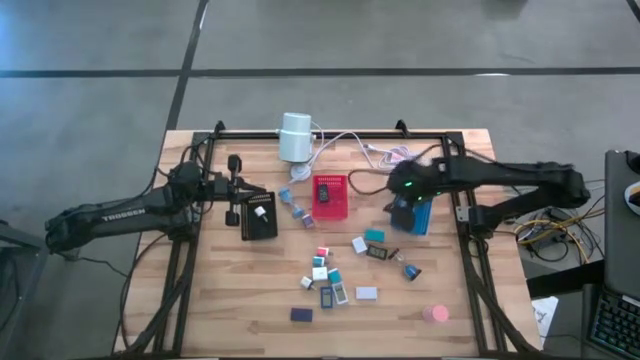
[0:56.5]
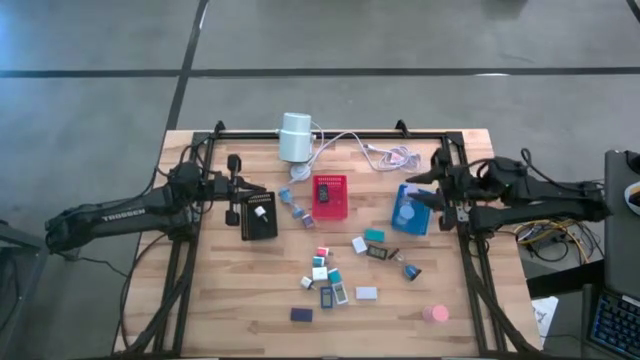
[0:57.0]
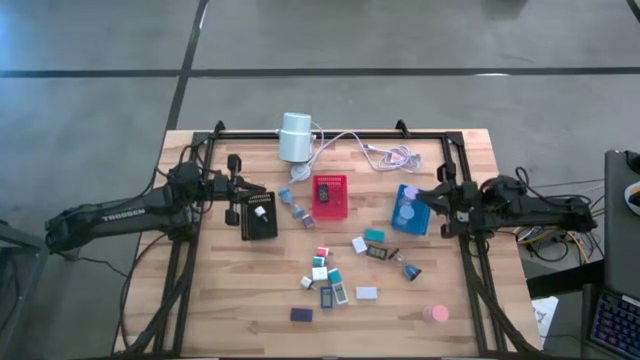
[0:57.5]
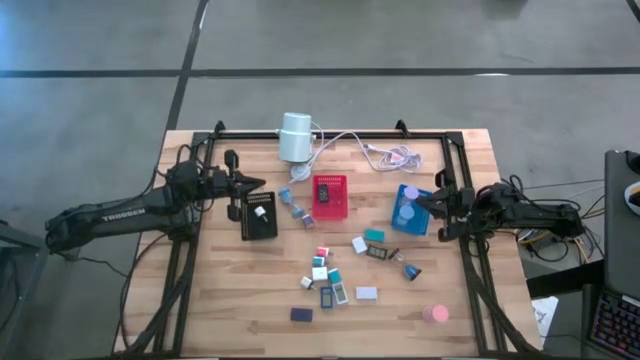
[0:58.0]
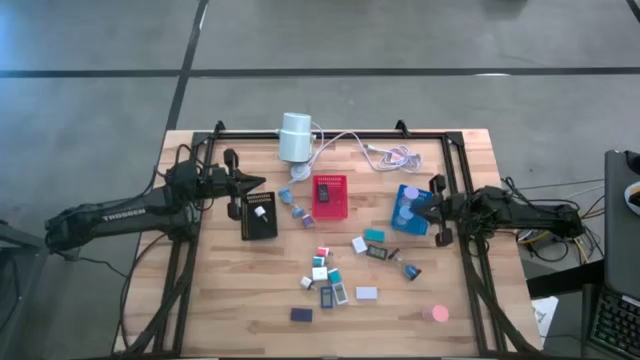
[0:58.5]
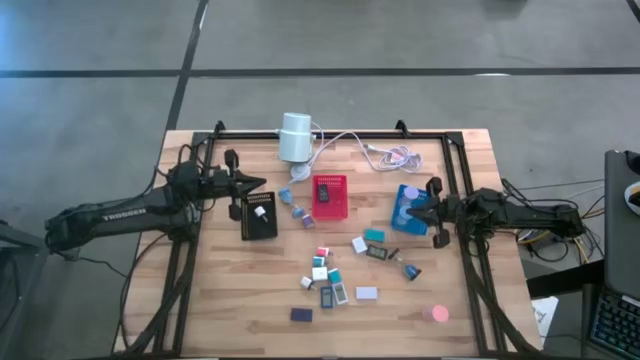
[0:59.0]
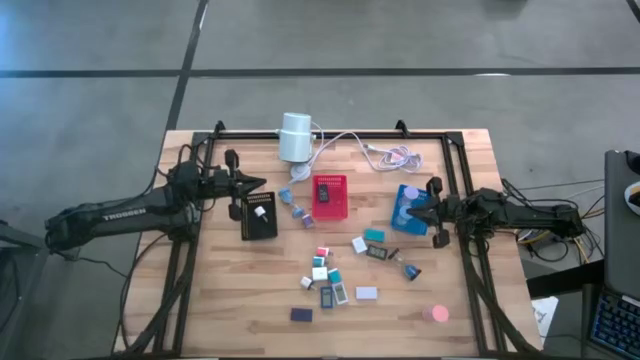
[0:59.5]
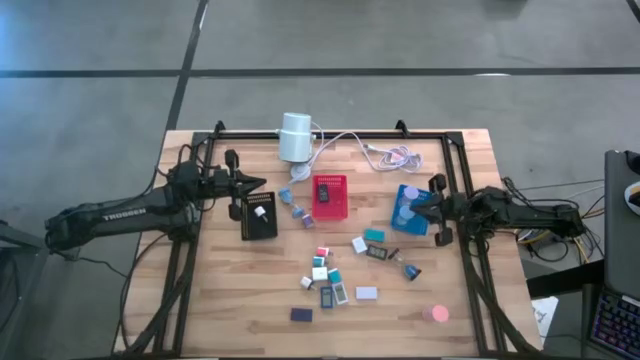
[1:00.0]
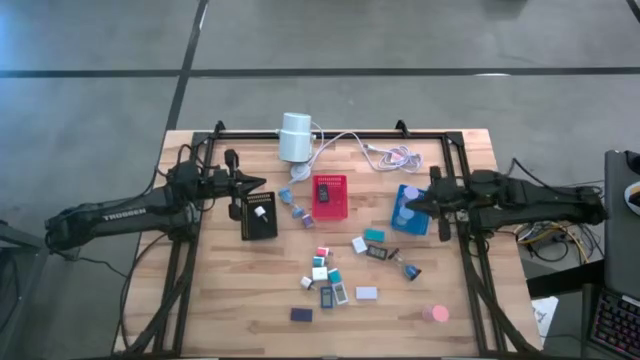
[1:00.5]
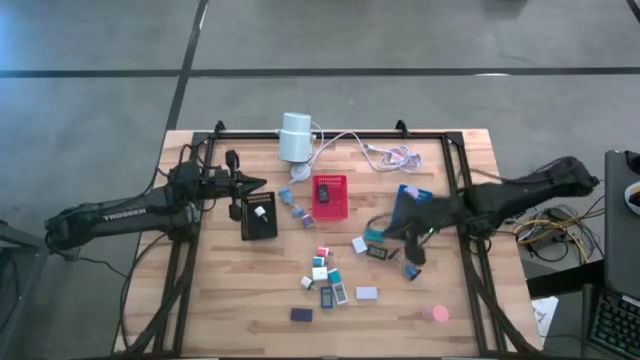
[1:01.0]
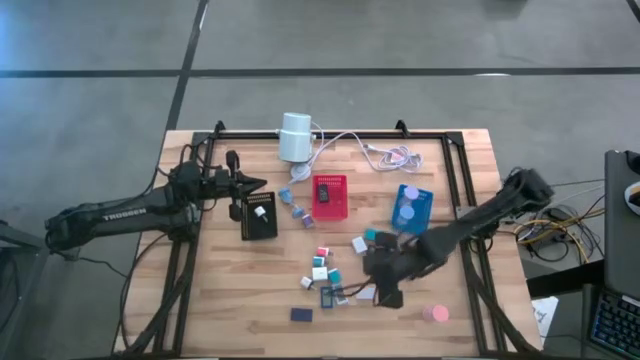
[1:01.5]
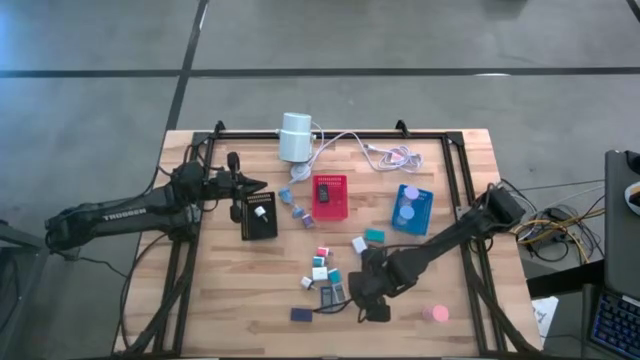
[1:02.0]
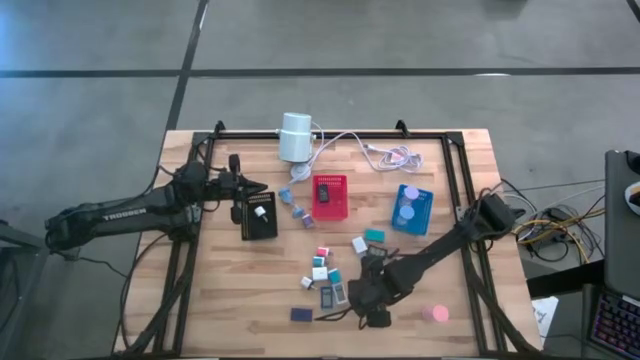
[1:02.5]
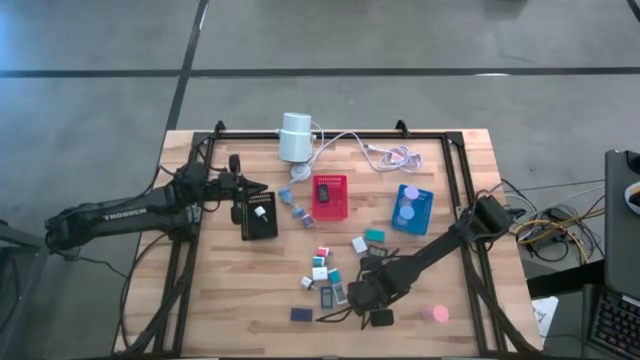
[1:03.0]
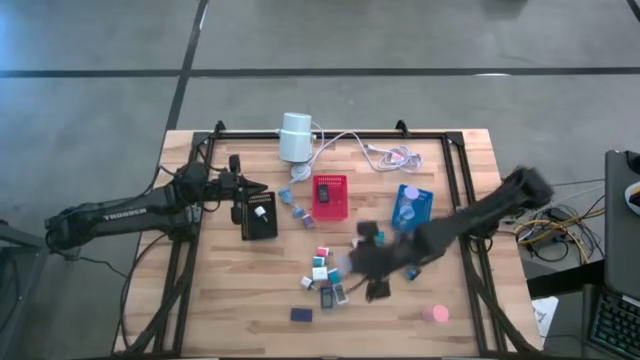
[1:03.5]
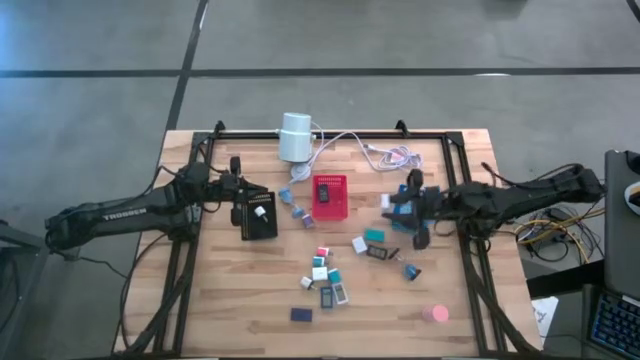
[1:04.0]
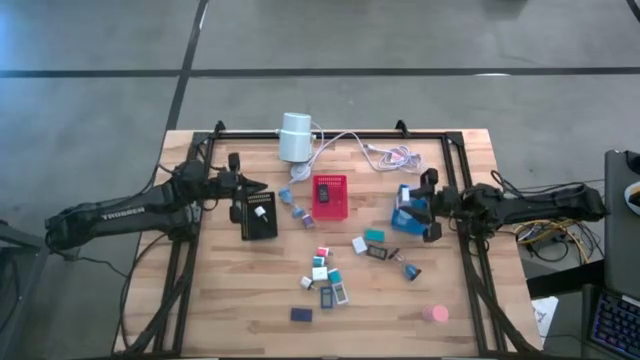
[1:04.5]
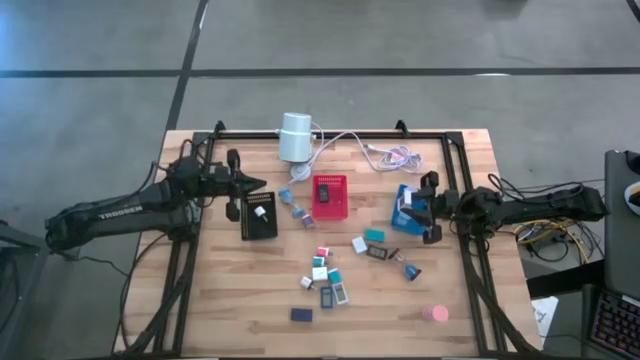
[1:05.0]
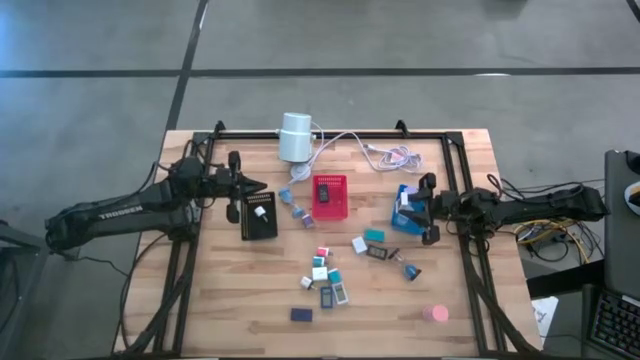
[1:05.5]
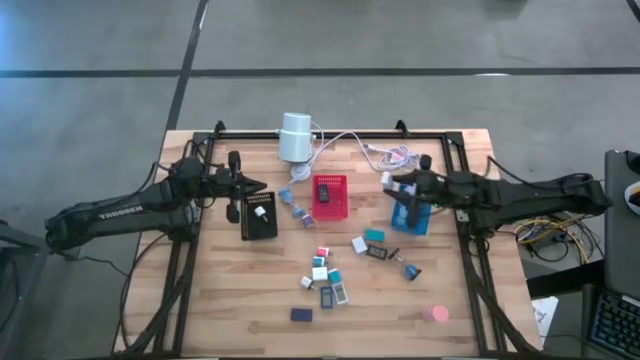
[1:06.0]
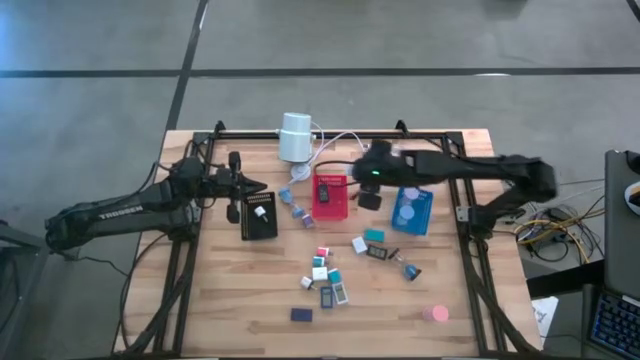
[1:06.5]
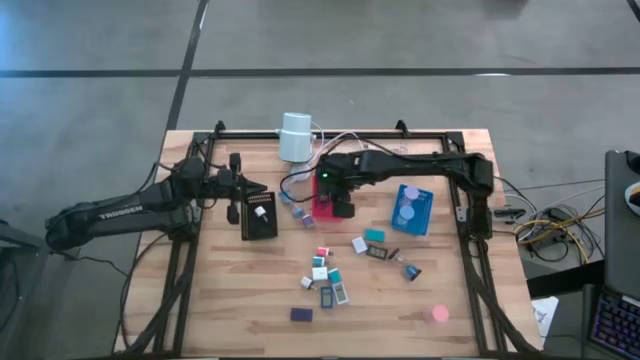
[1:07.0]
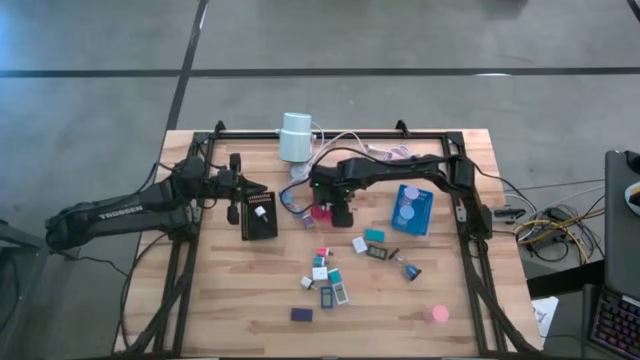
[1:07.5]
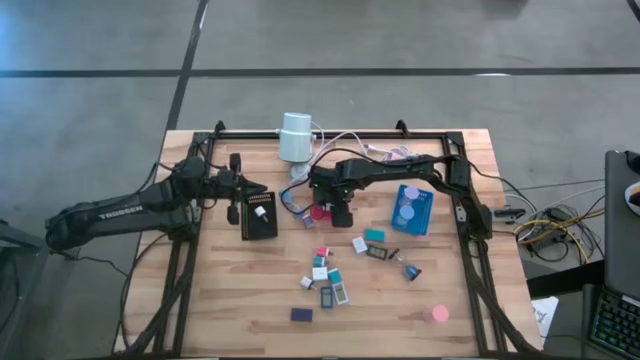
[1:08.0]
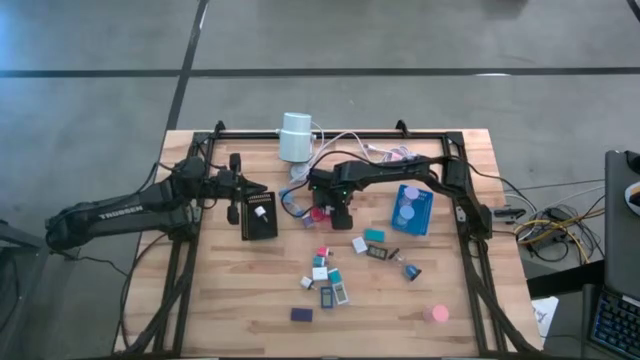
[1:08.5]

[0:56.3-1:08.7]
Task: Pick & Place Office items
Put the right white digital clock into the red basket

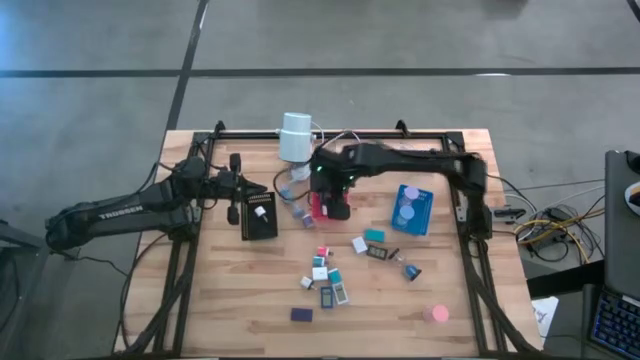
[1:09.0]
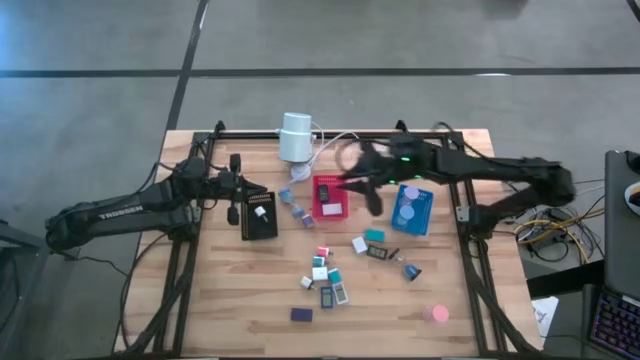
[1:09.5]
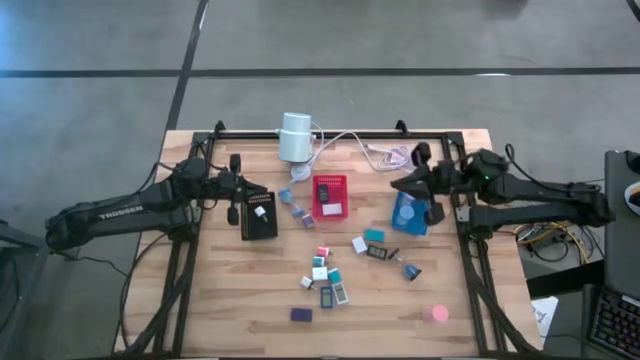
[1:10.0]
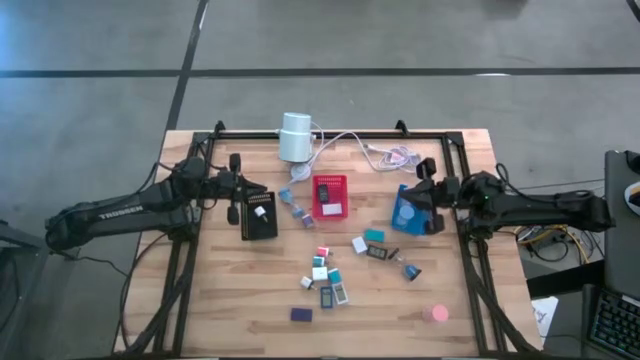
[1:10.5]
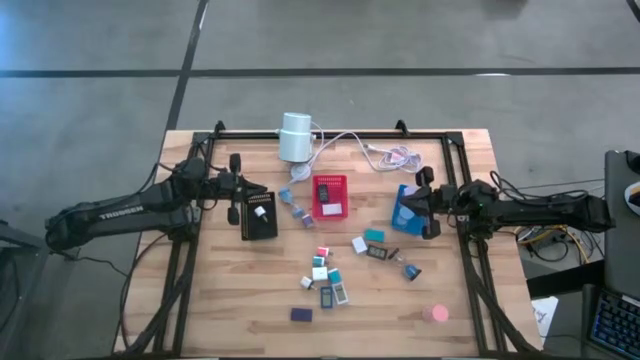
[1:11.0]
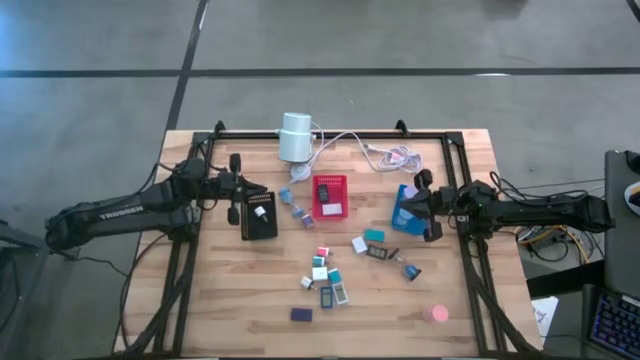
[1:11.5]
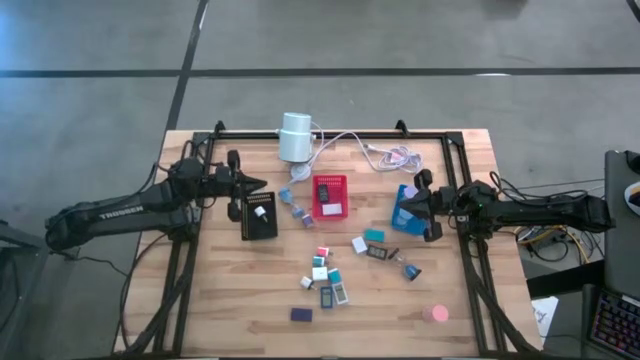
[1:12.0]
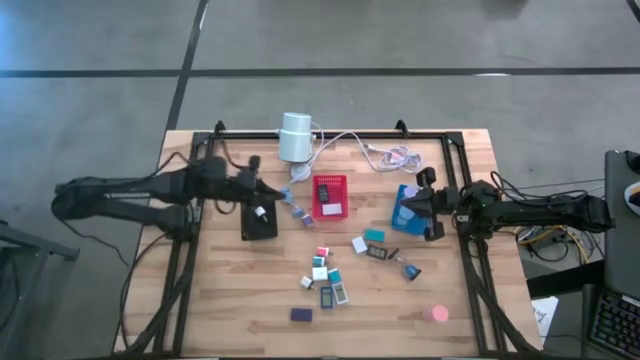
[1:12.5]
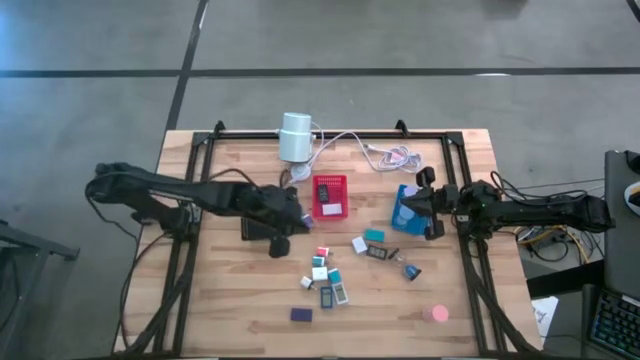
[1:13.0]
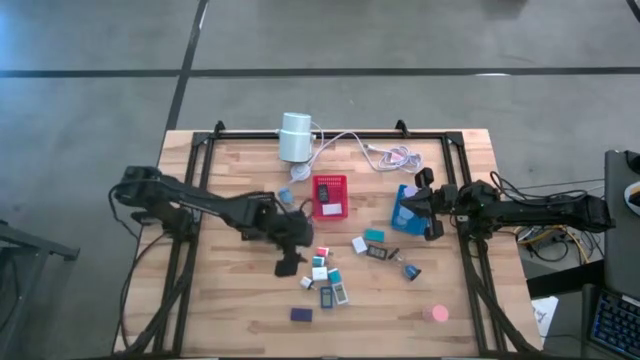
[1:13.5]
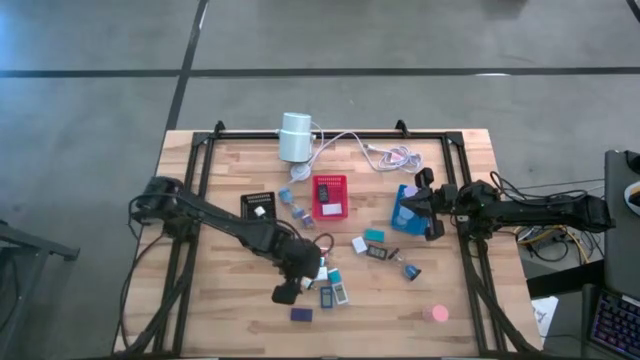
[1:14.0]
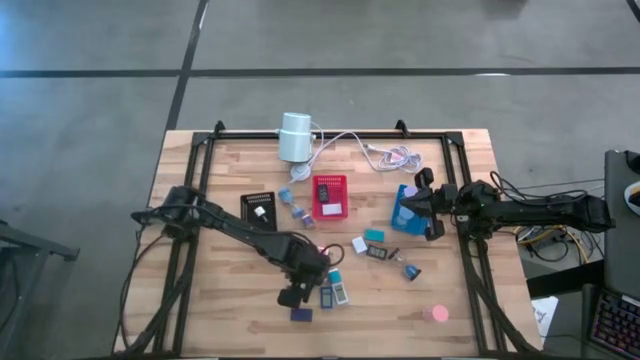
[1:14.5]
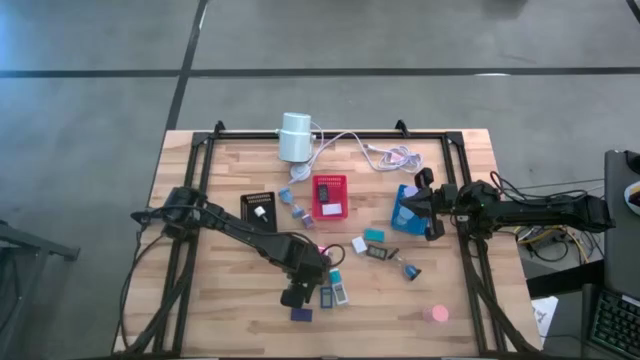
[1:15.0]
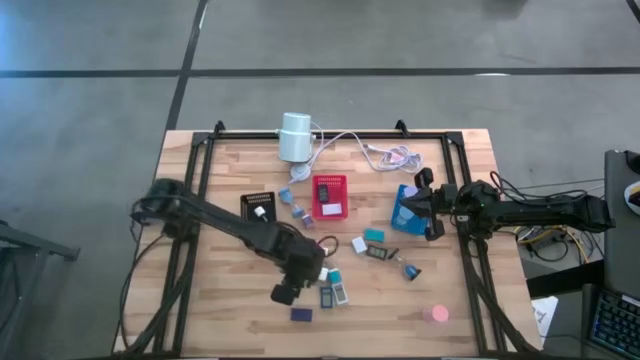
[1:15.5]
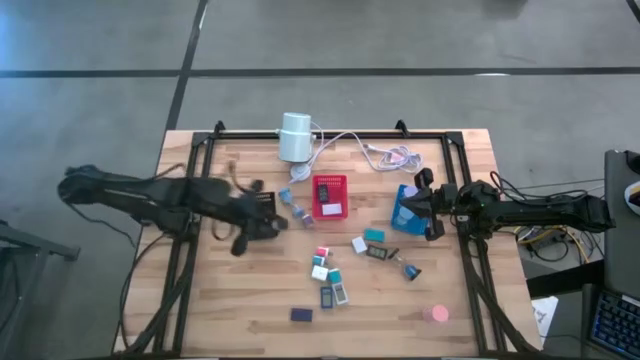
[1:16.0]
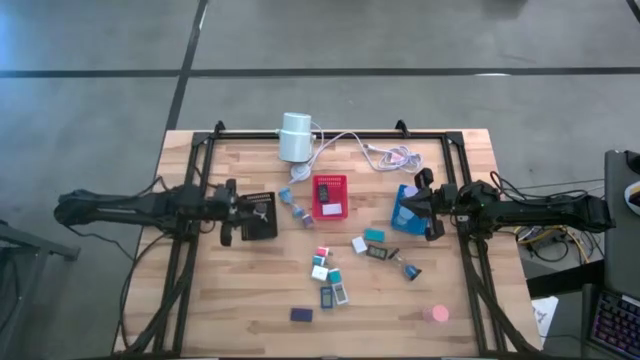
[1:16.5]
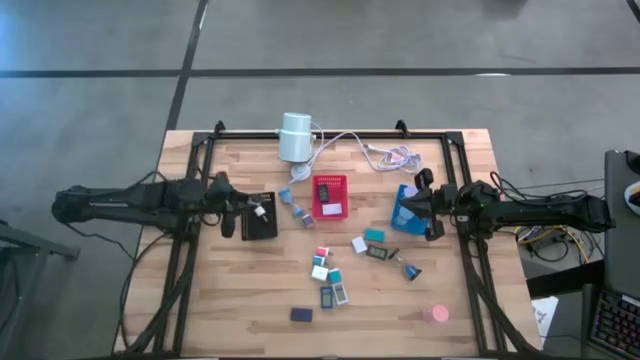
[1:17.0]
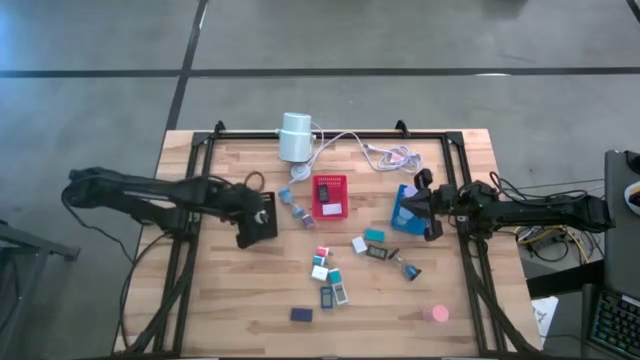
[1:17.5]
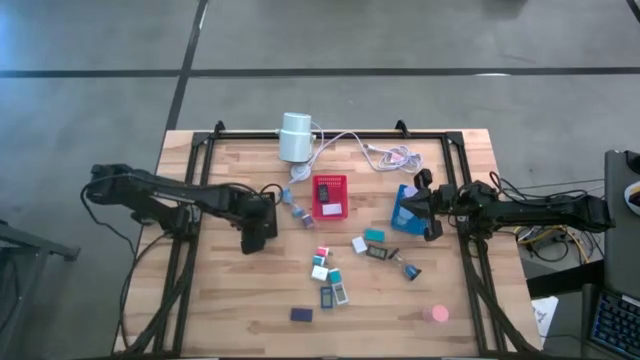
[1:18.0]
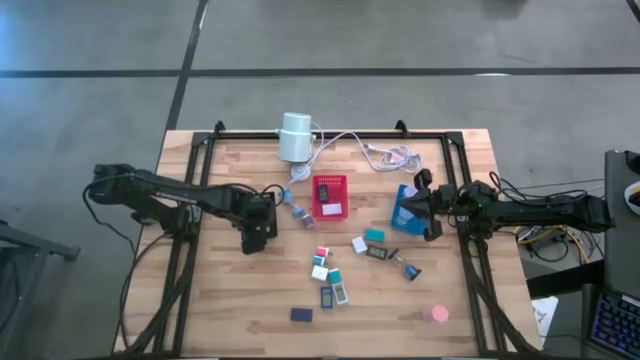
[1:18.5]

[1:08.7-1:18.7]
Put the black charger adapter into the black basket
